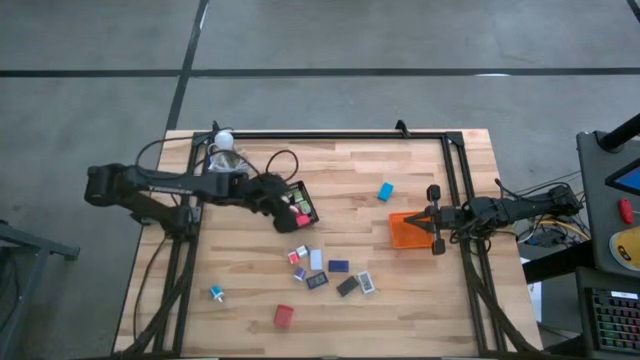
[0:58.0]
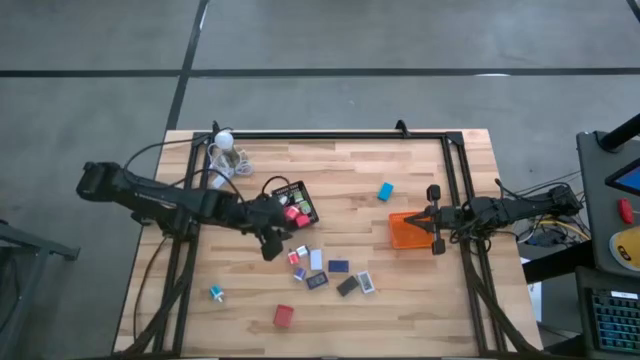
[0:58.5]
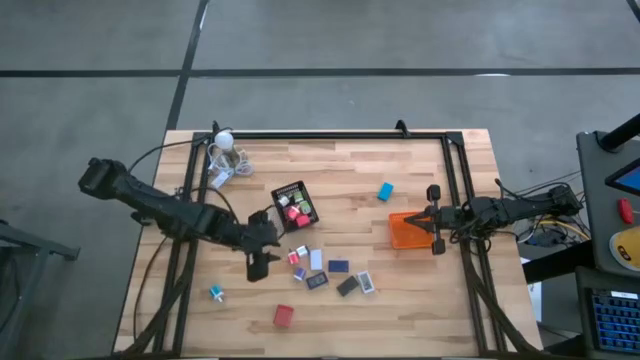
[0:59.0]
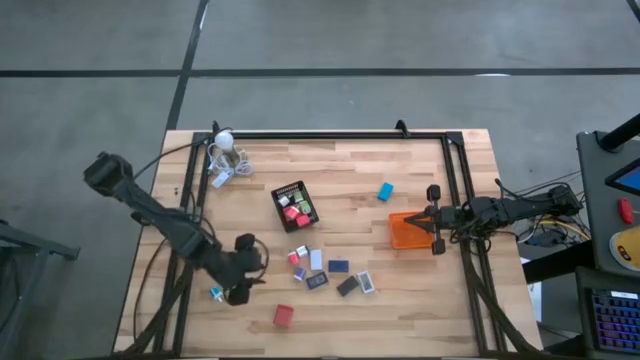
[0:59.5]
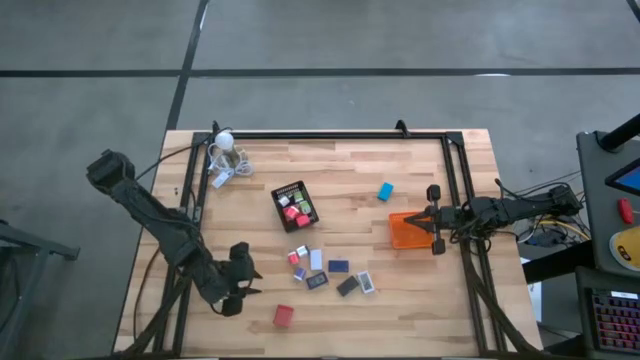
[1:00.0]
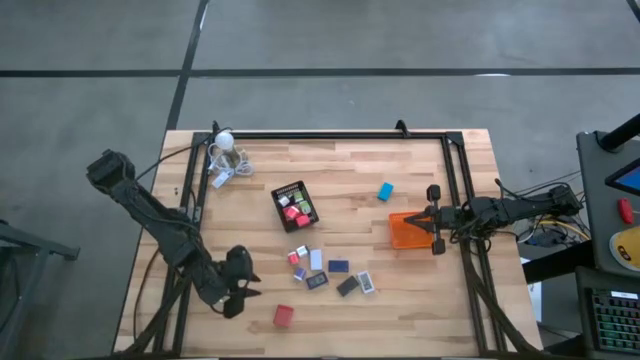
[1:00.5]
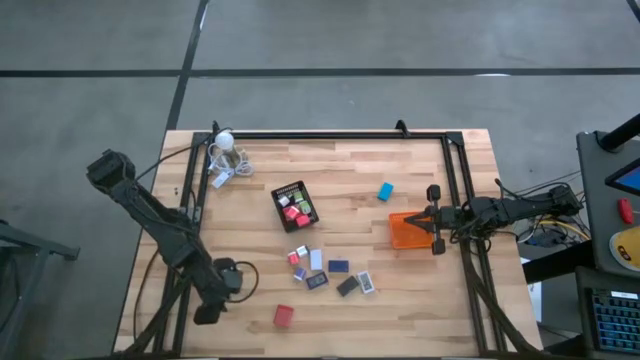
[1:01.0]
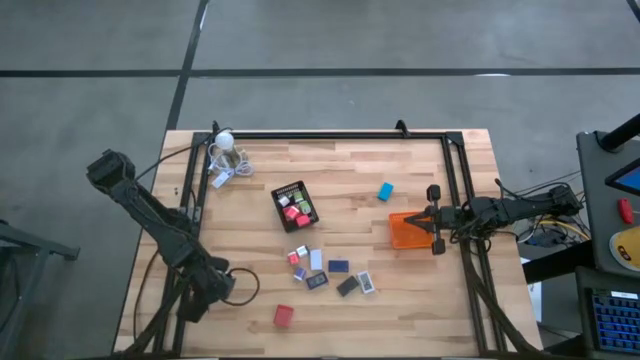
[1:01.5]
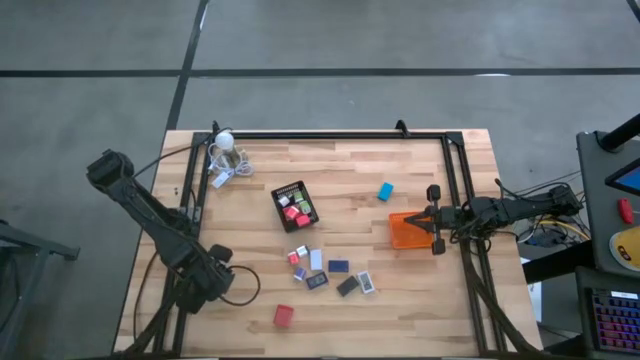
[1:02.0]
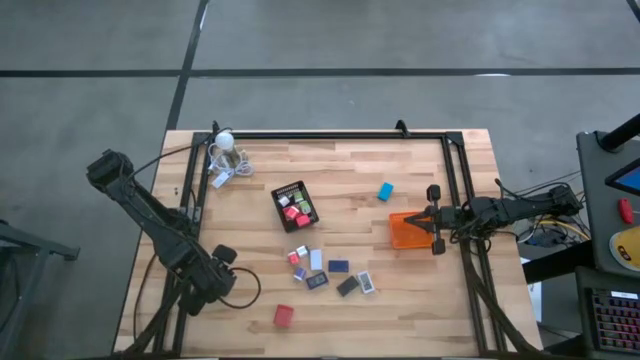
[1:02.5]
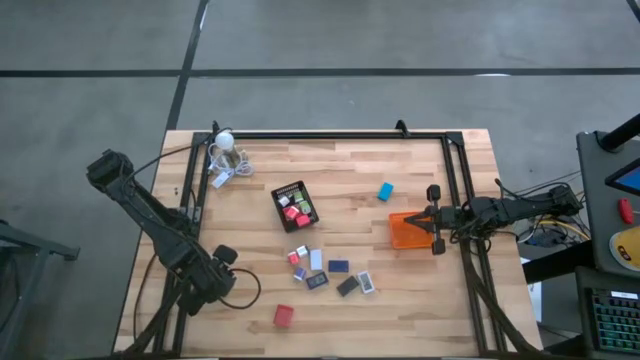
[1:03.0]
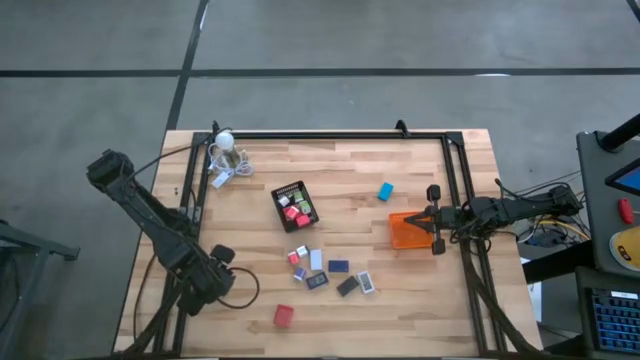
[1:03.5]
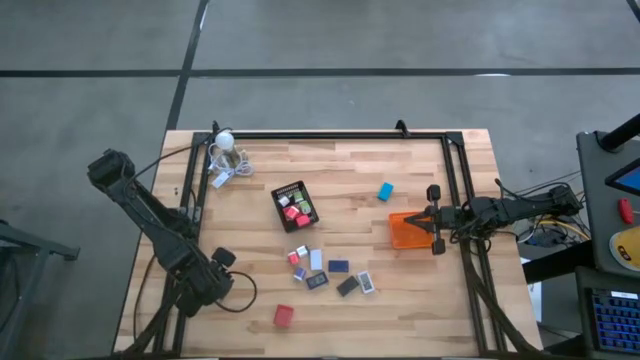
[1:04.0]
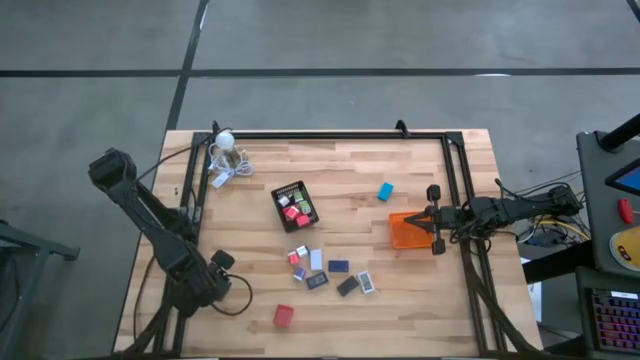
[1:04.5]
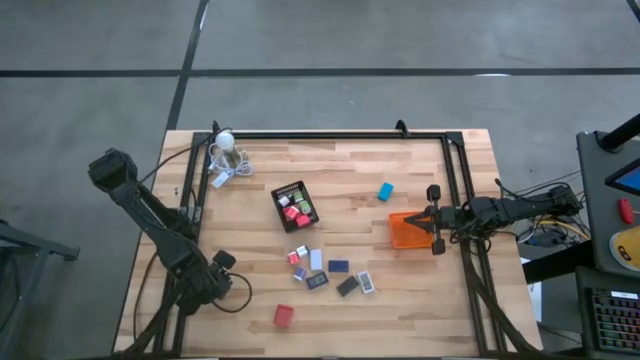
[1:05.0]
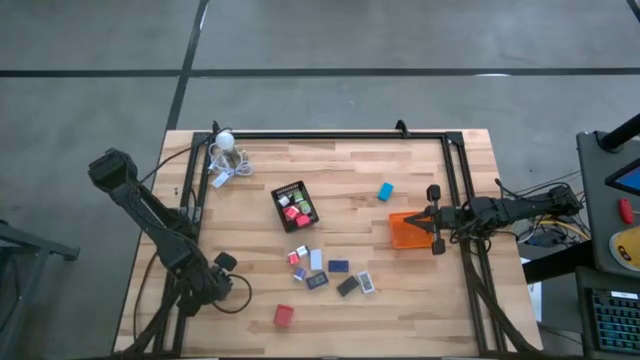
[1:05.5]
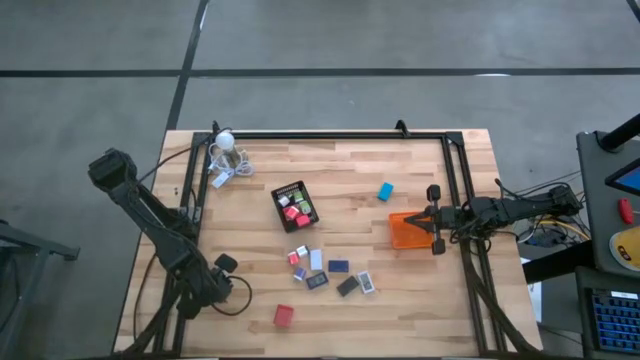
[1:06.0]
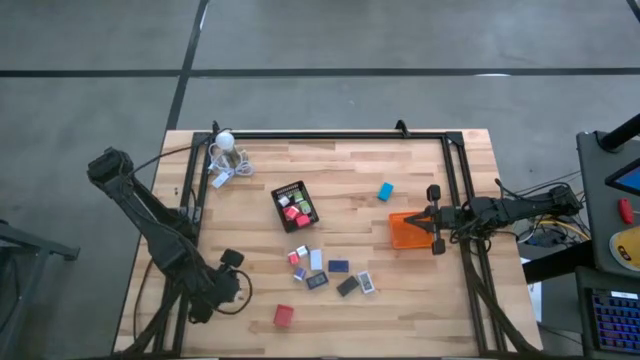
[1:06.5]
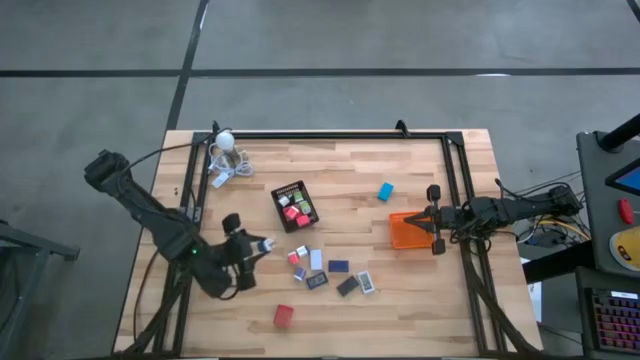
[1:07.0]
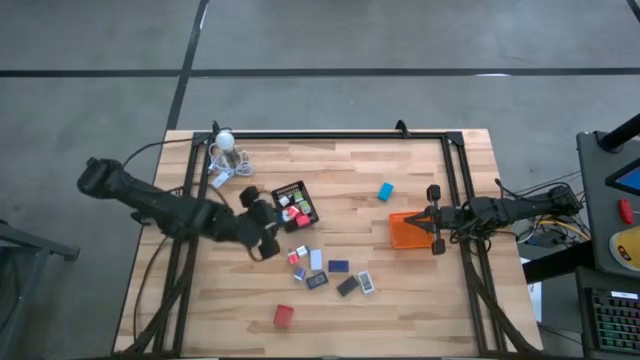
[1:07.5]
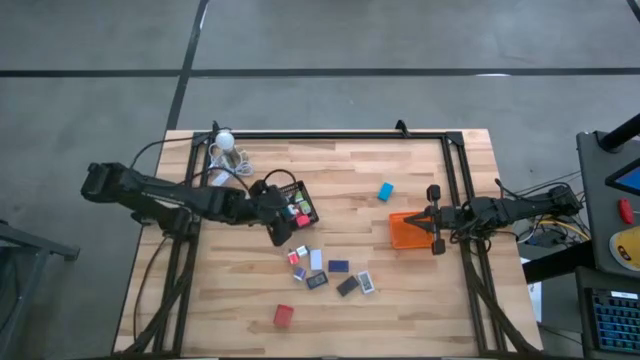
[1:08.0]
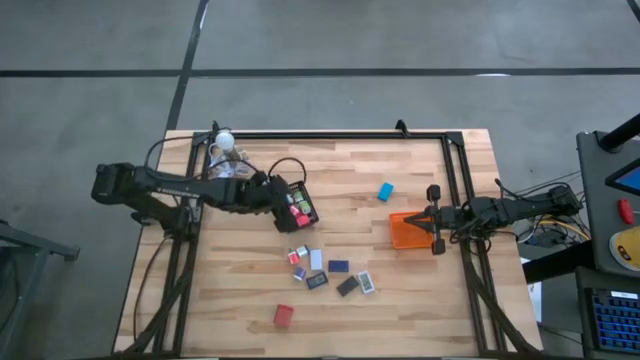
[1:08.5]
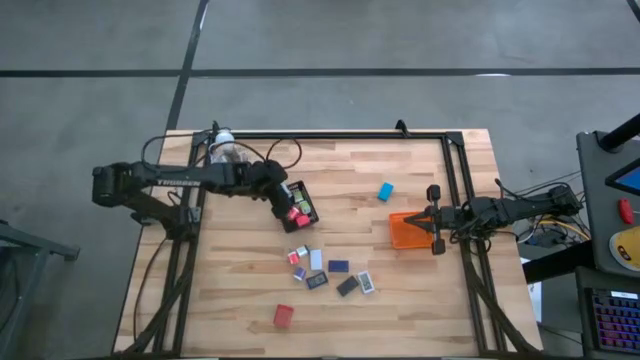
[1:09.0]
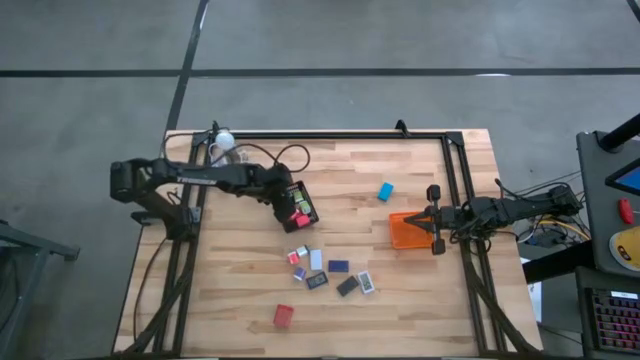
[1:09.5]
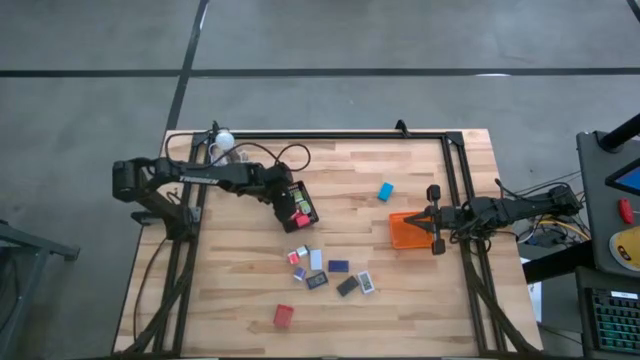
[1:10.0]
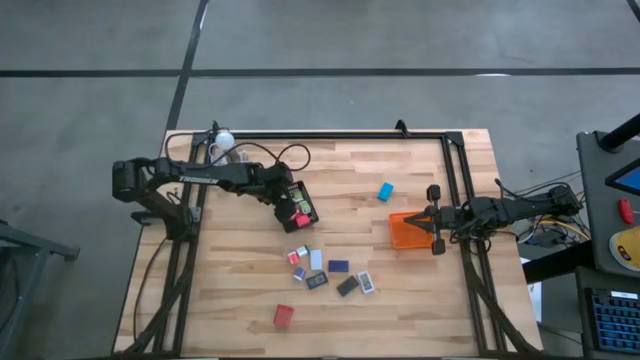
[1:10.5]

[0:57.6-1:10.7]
Task: Pick & Place Office items
Put the blue charger adapter in the black bin

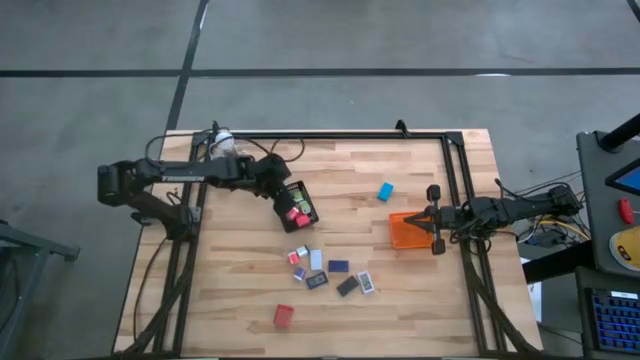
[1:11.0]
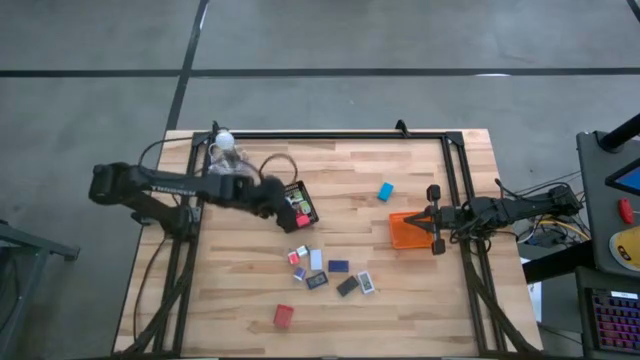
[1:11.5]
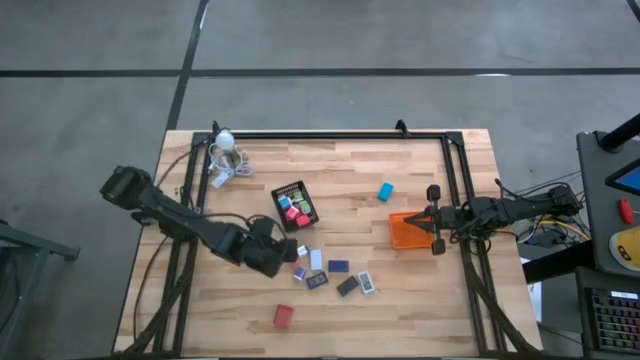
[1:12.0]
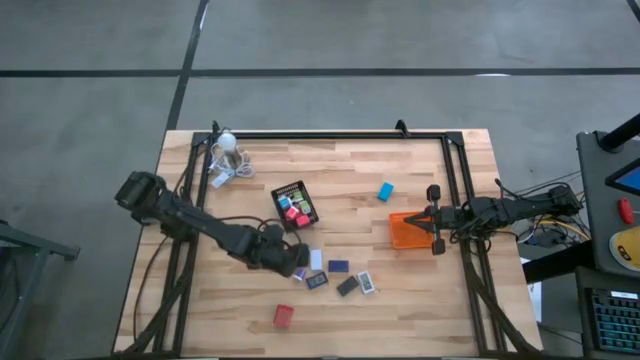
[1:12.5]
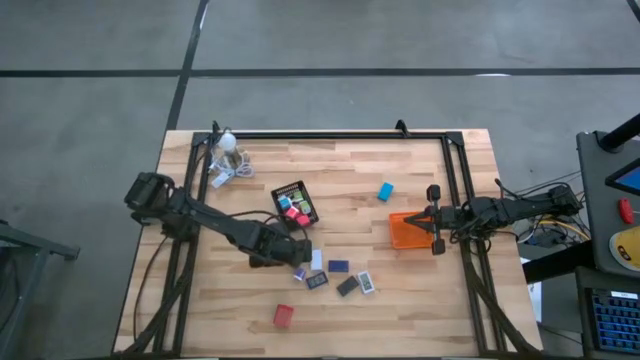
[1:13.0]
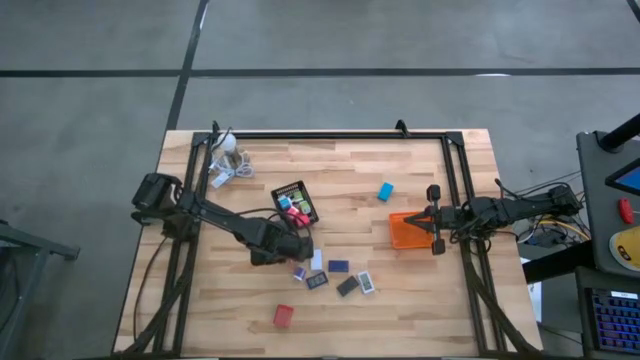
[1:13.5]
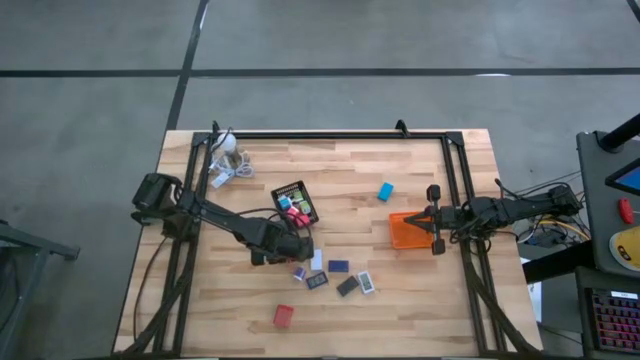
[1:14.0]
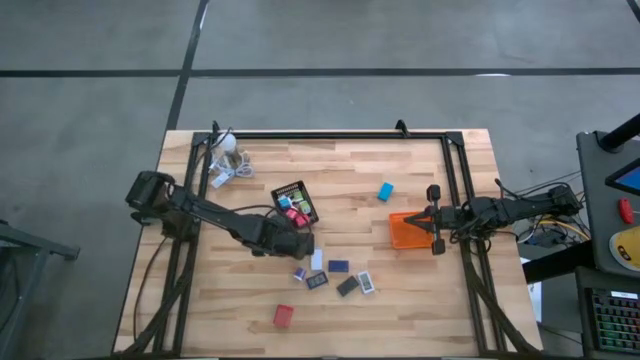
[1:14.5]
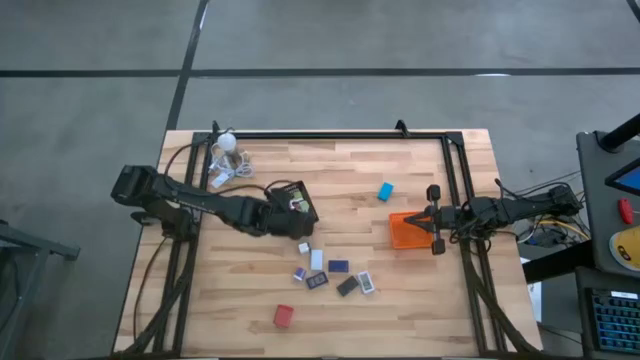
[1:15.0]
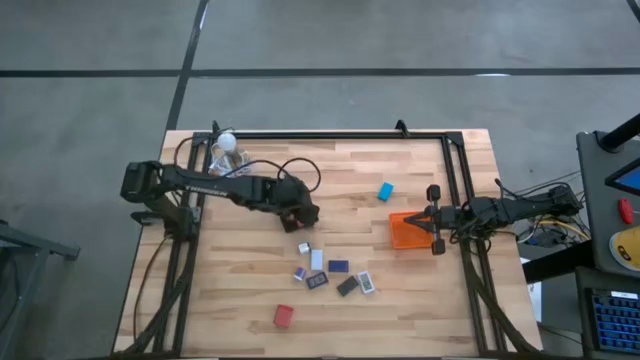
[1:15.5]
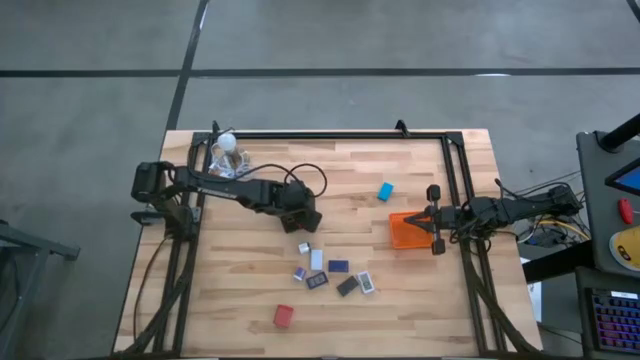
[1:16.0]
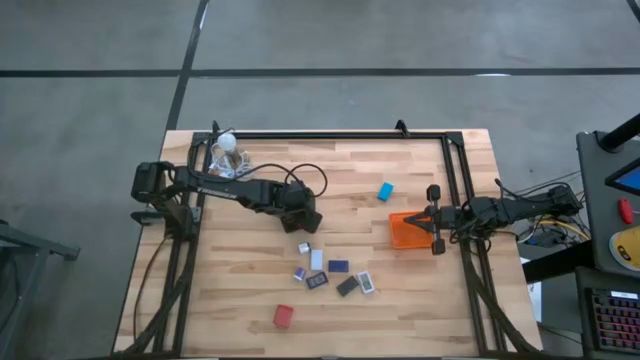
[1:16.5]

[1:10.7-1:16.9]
Put the pink charger adapter in the black bin

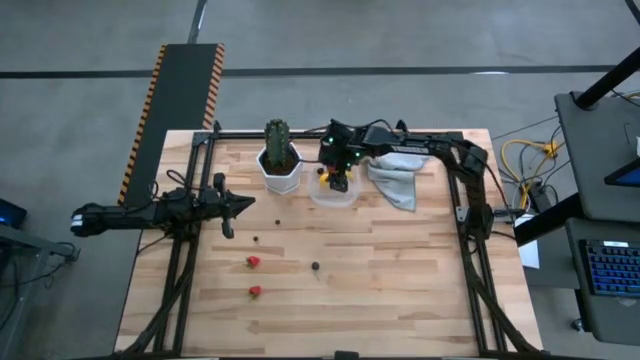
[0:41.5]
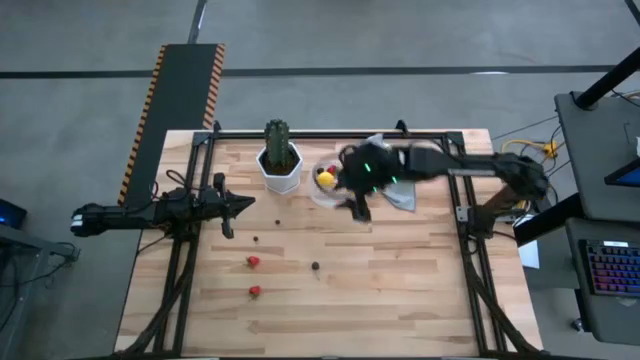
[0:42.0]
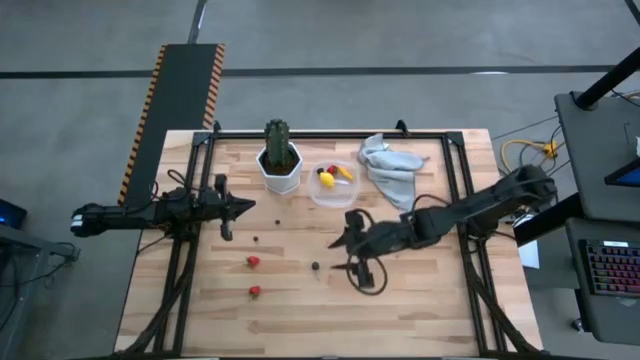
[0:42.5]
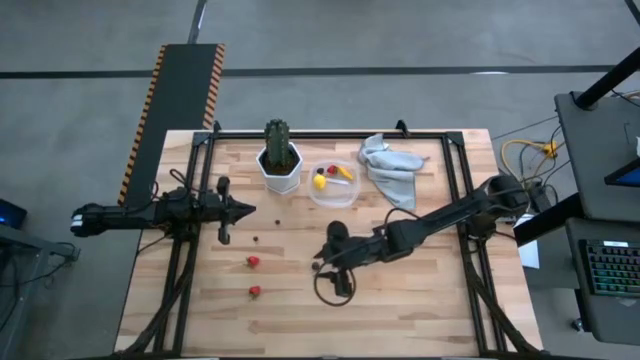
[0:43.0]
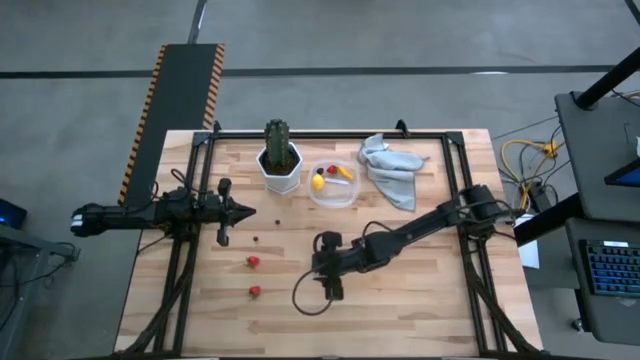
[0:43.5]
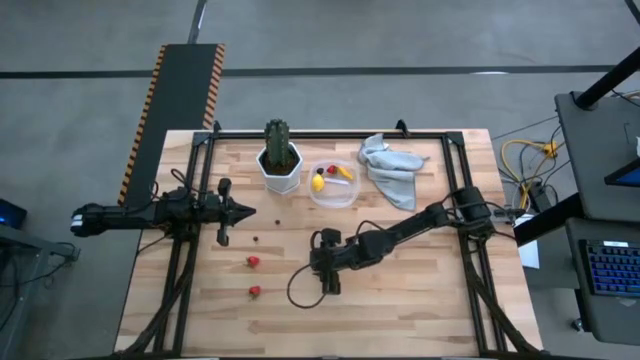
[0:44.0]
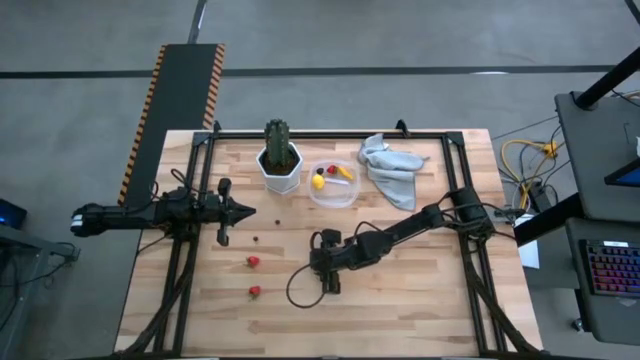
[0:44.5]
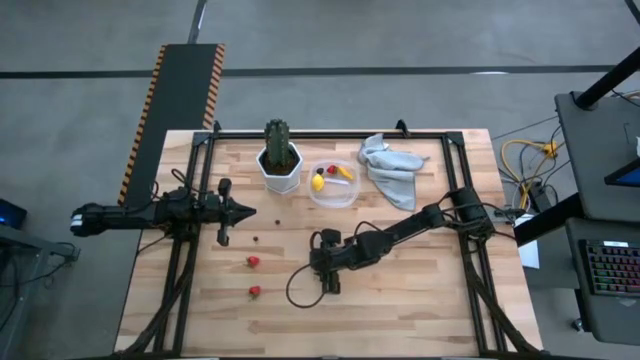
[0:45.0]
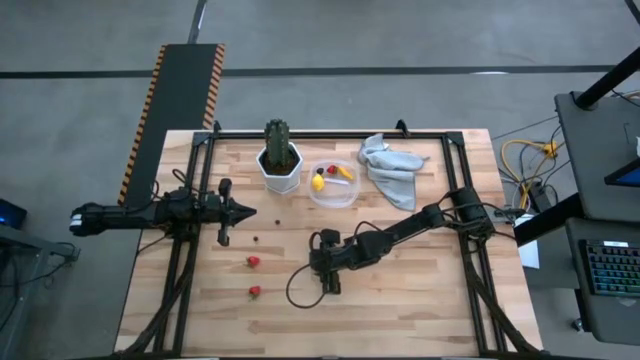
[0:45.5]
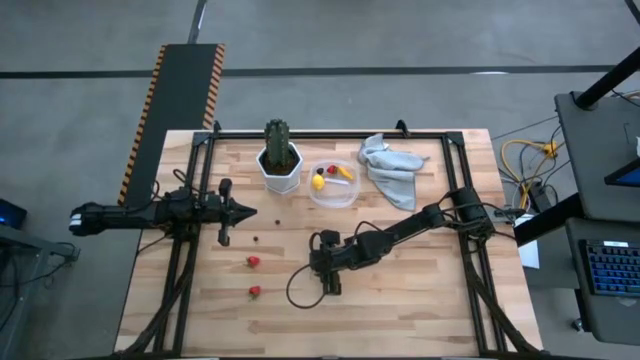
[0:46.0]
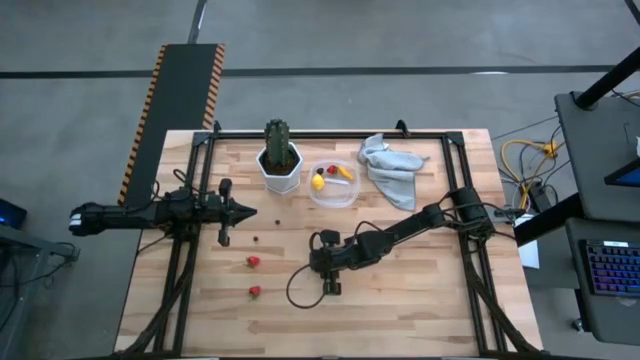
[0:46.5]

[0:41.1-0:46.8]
Task: Pick and placing Produce into tupperware
Put the black cherry into the transparent bin
